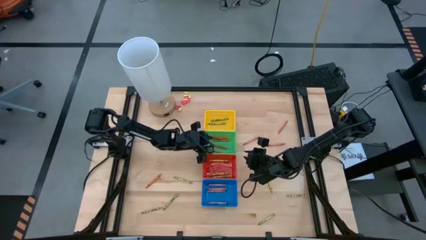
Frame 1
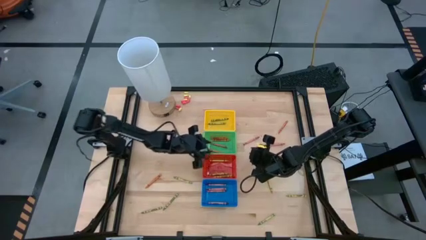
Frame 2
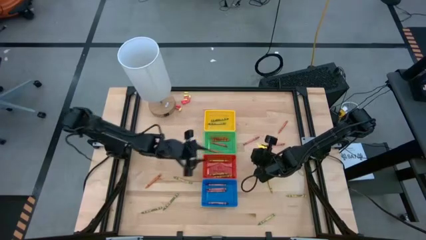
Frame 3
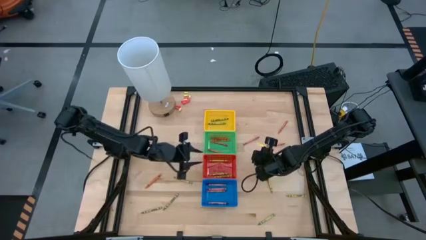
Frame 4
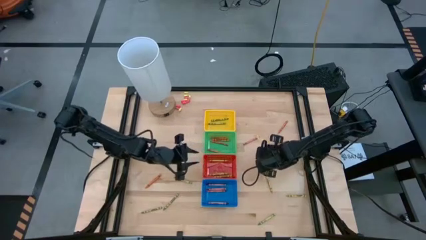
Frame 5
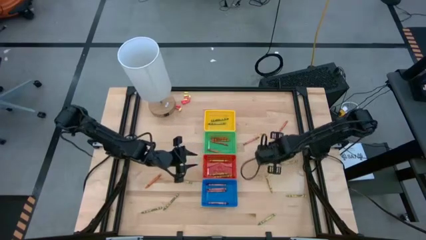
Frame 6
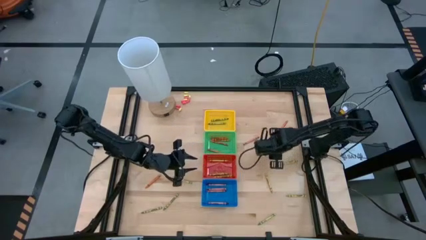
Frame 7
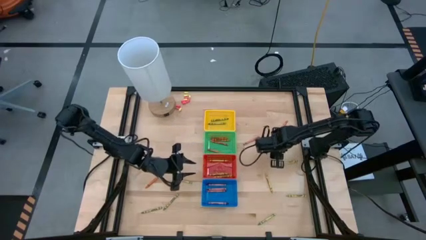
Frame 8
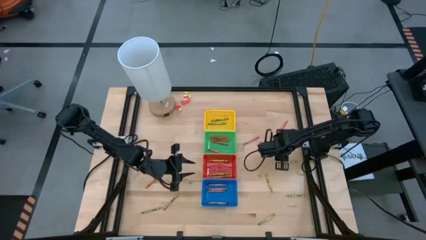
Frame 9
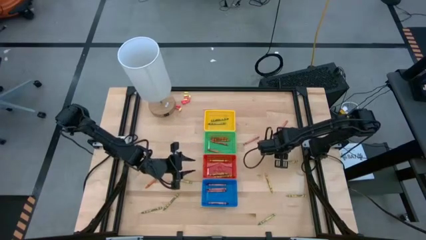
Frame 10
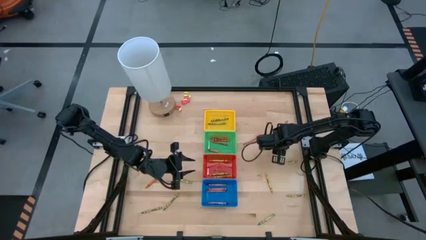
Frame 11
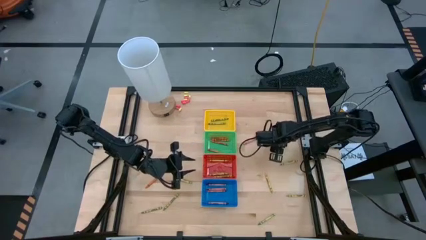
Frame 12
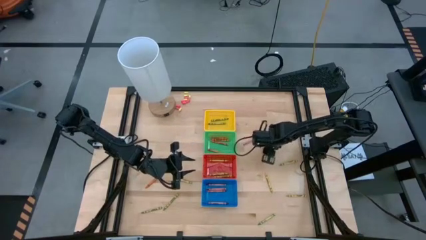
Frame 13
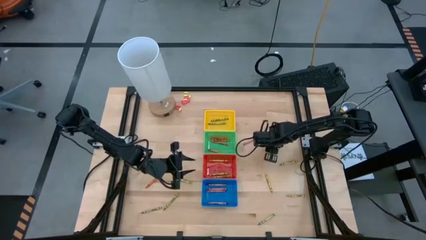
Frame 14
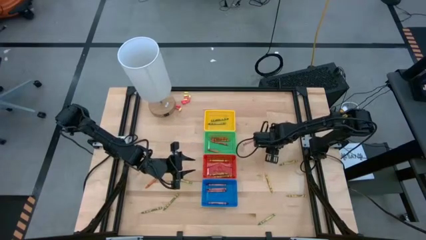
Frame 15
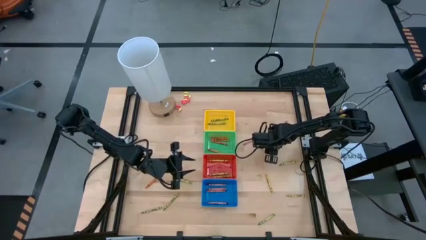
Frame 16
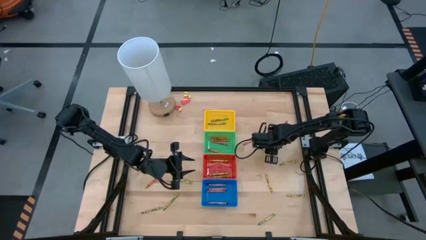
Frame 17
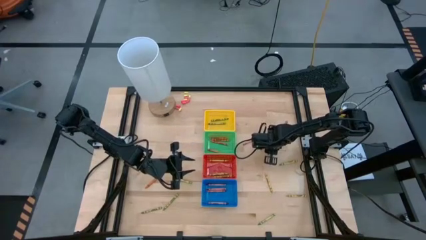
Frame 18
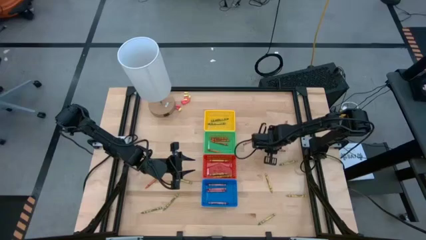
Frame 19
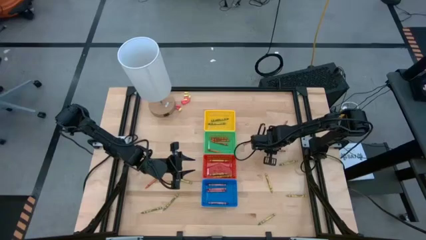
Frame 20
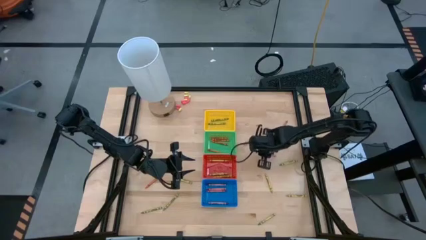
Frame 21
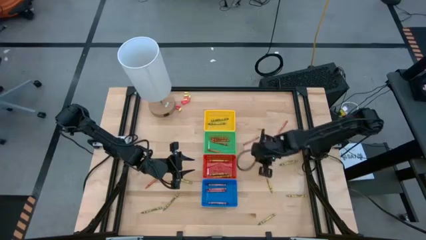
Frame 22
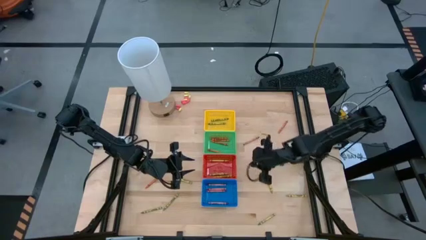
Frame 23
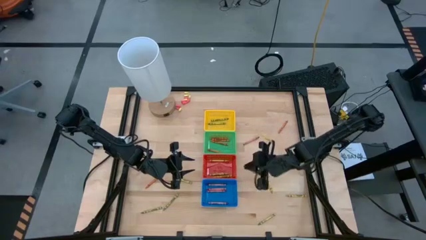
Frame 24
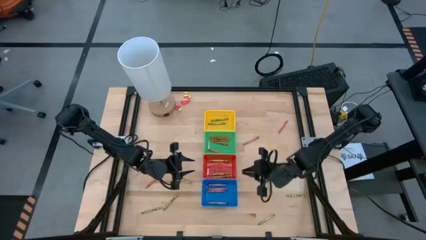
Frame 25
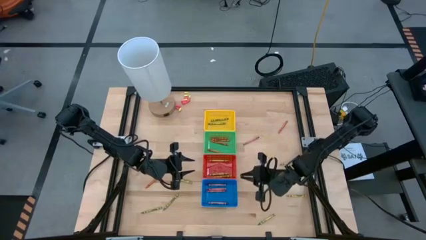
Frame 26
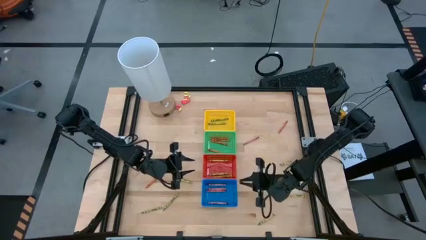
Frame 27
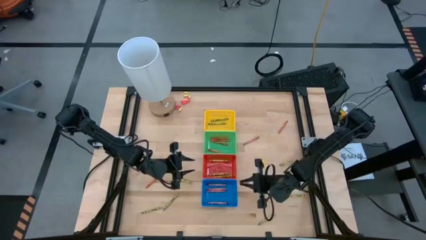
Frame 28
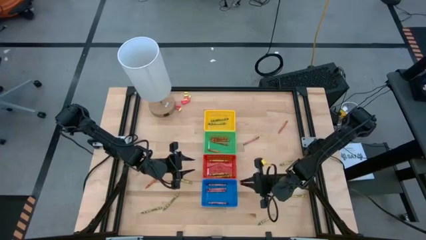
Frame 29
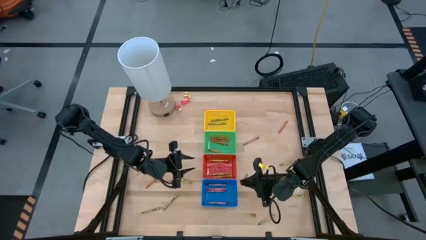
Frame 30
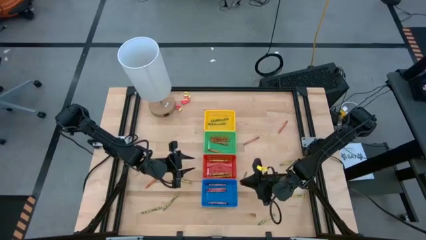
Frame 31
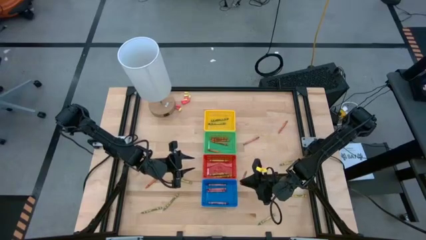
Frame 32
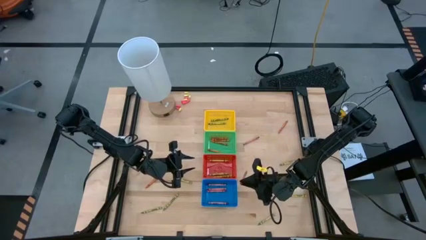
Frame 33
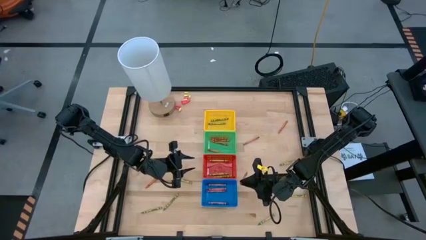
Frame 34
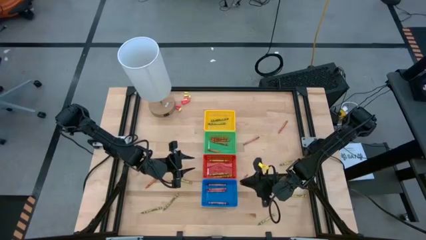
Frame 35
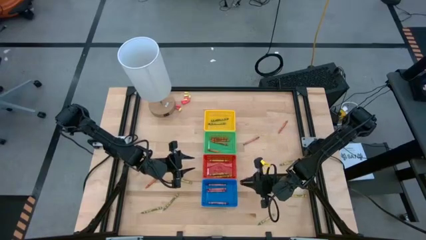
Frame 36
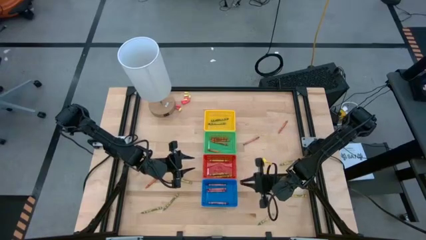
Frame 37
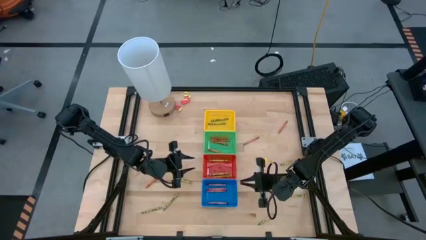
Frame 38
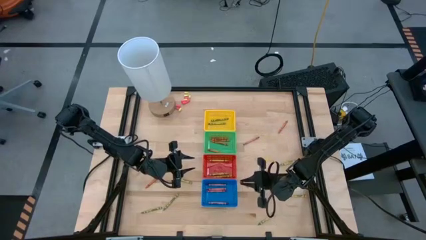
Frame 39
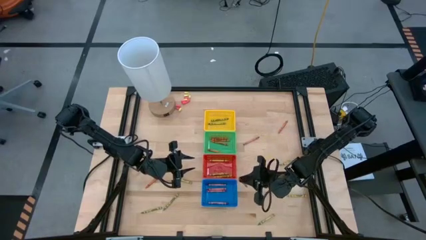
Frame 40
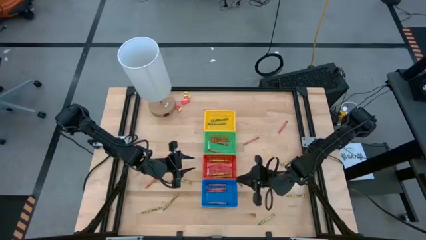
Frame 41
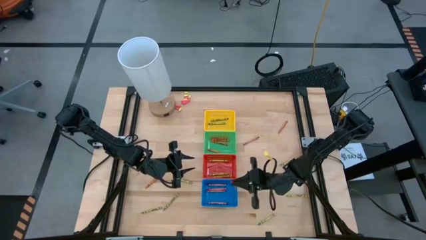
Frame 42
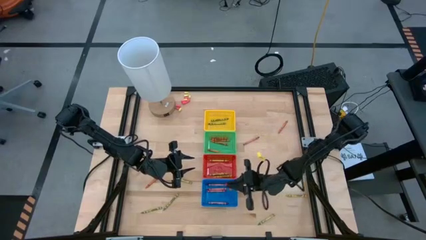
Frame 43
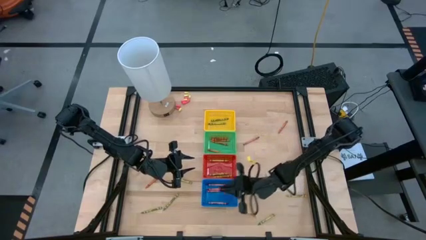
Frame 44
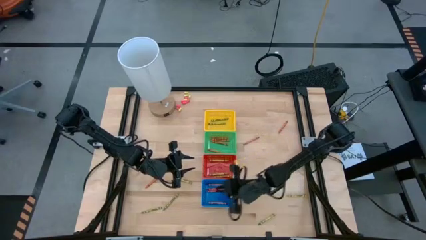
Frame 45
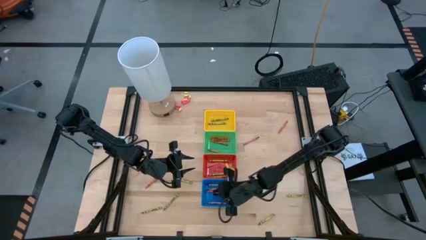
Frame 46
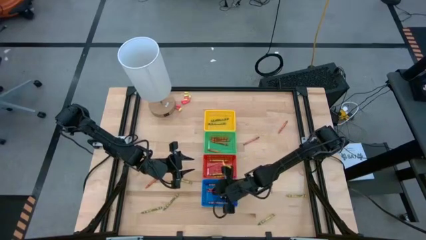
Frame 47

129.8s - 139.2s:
Task: Sort crayons
Put the red crayon into the blue bin

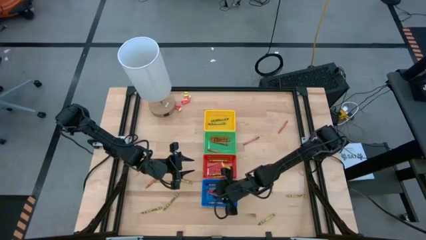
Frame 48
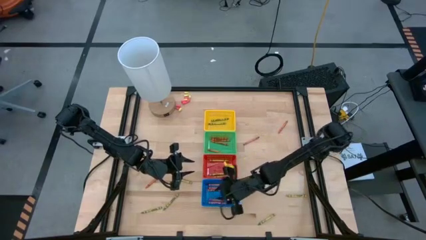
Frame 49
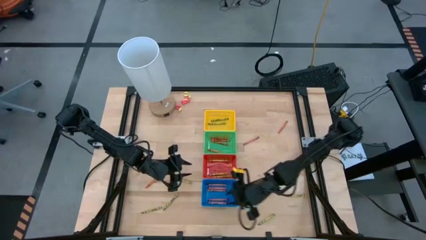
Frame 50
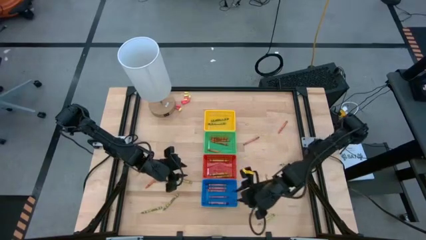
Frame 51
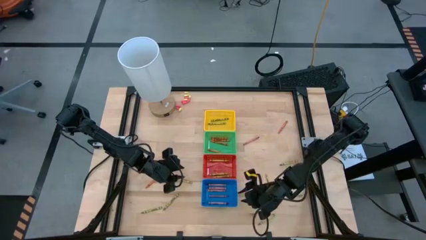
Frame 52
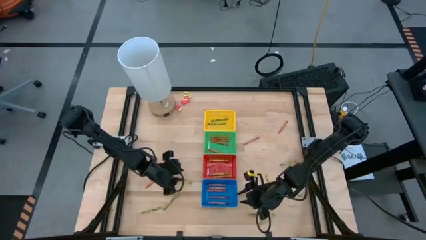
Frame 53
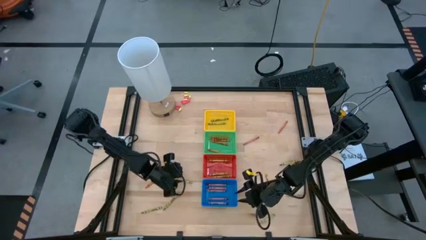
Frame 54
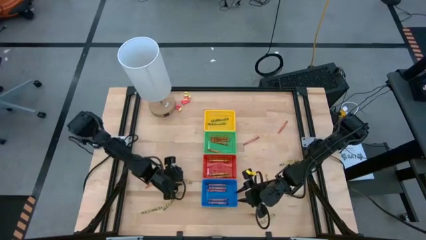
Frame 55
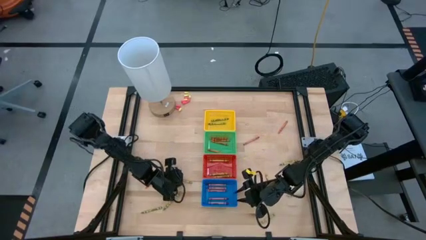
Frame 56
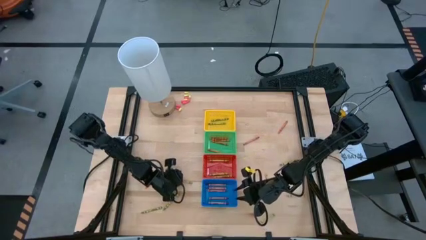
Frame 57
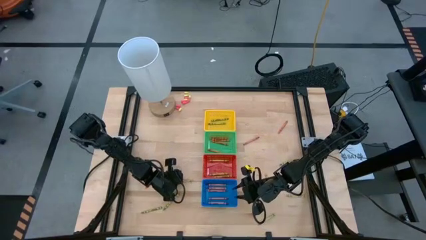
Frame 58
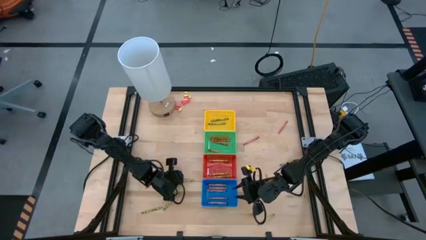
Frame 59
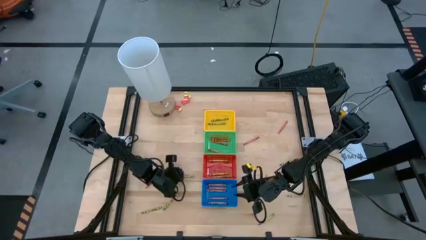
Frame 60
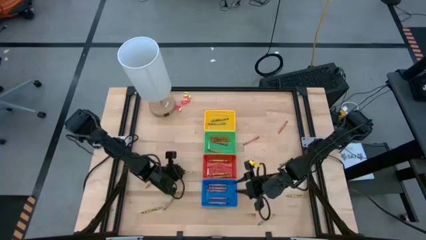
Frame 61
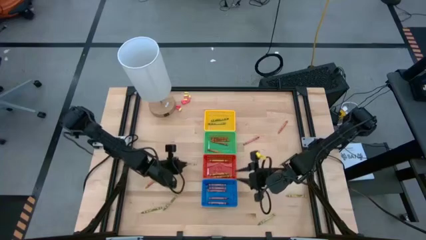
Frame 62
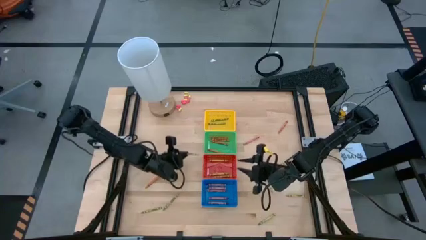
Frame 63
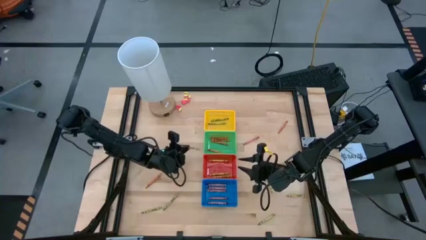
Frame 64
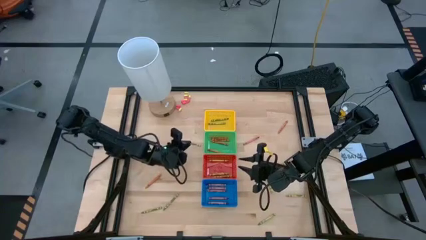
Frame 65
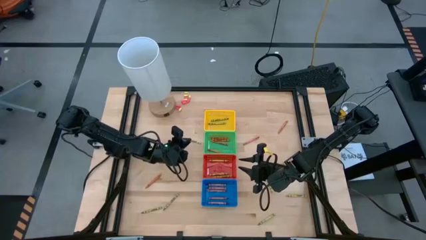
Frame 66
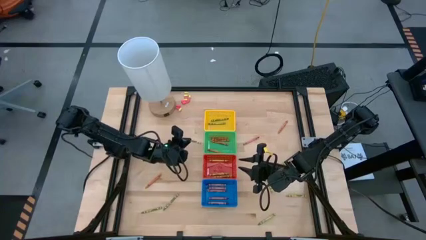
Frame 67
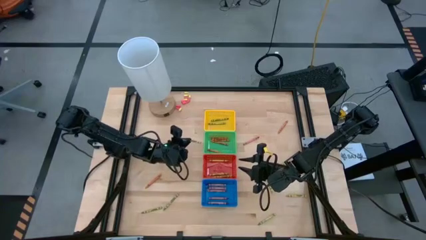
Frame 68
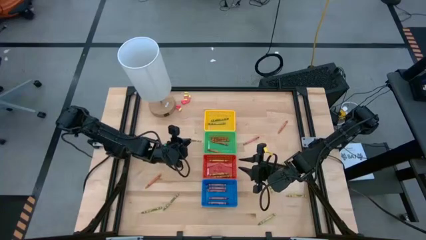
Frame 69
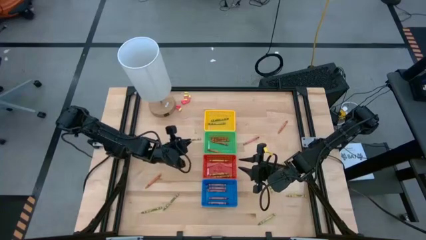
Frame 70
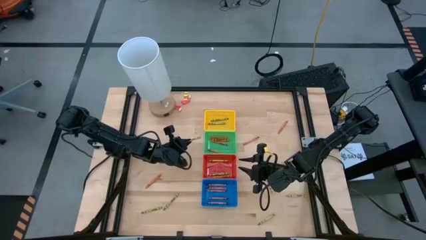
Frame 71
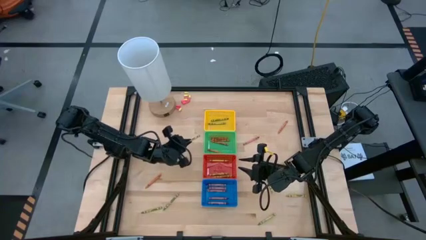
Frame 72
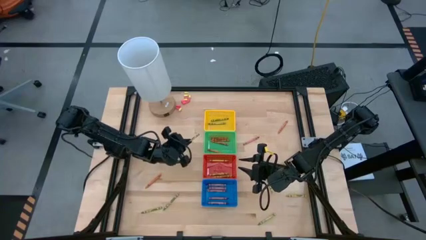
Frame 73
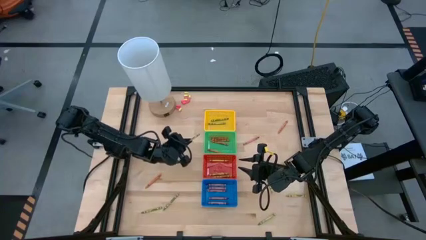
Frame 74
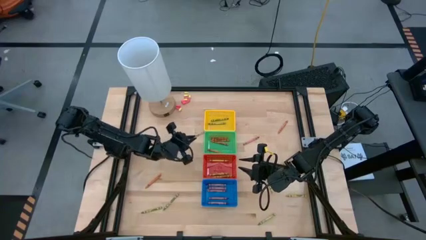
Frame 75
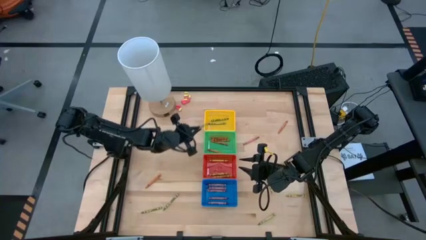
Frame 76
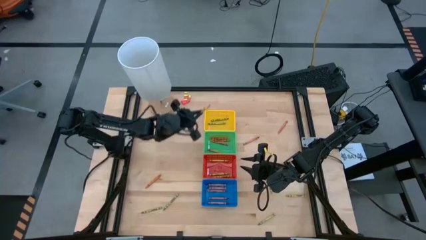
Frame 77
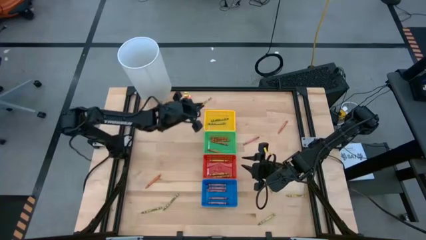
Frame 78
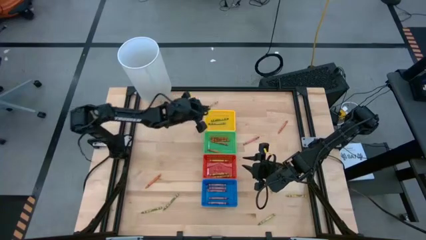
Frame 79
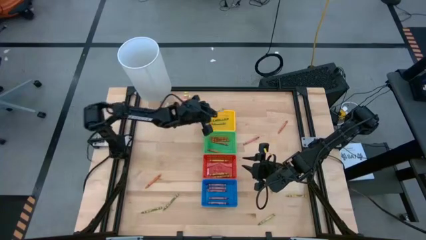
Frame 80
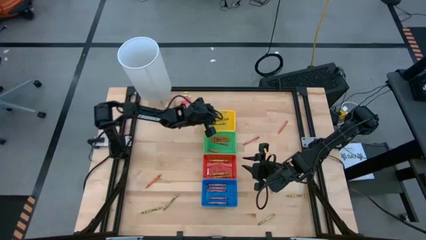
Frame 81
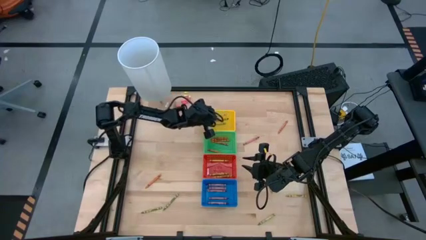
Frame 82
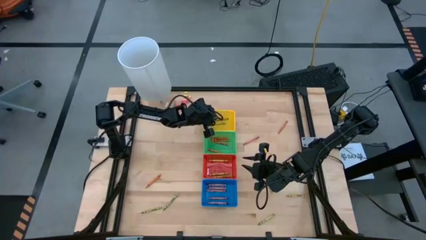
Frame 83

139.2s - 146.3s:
Put the green crayon into the yellow bin
